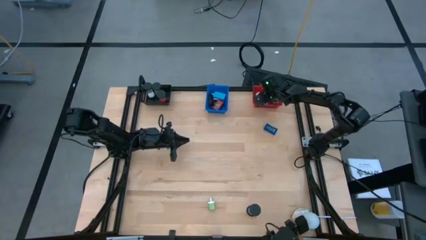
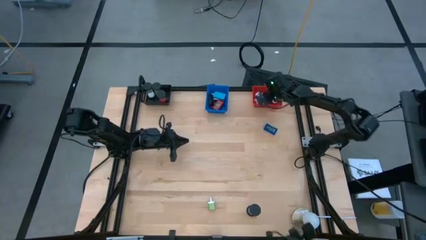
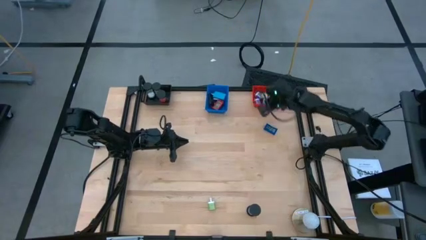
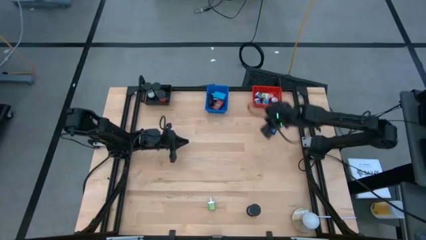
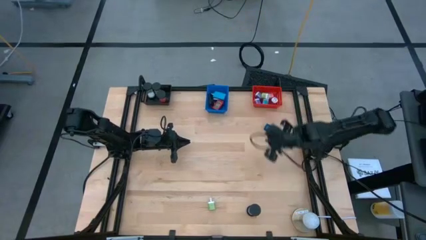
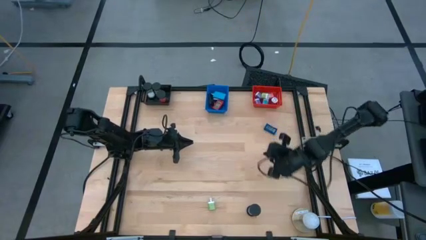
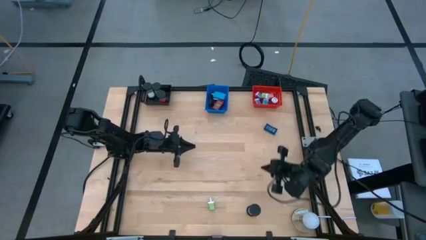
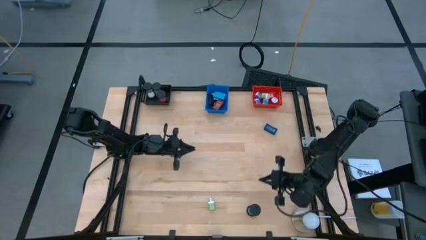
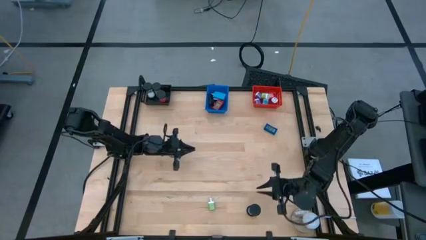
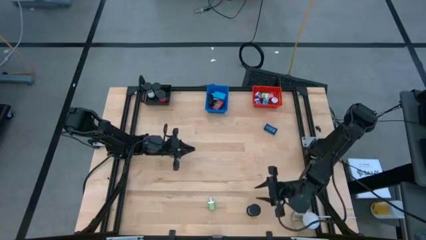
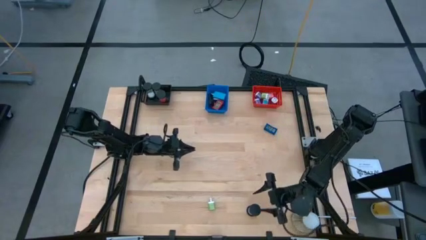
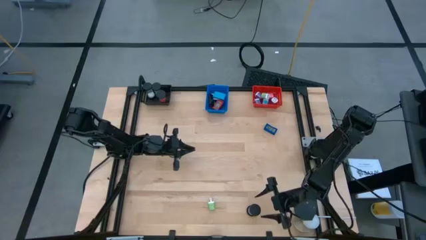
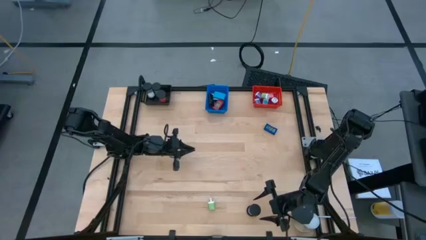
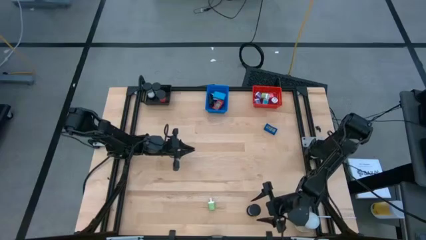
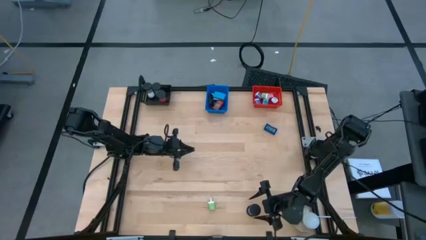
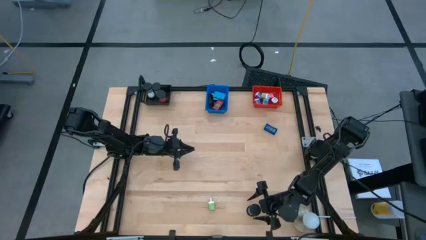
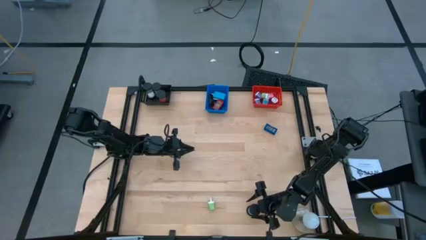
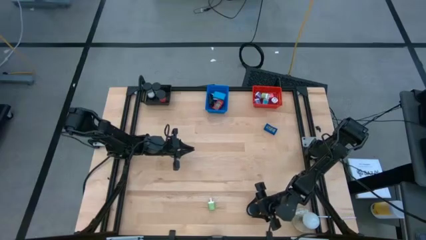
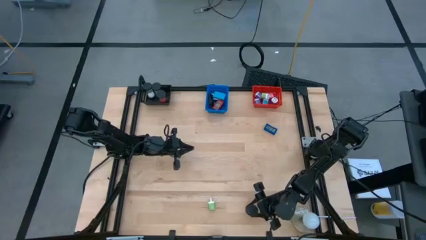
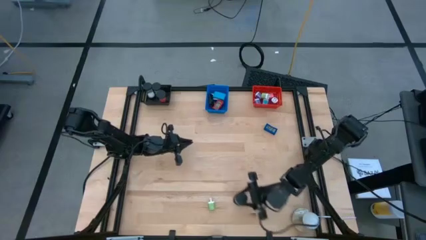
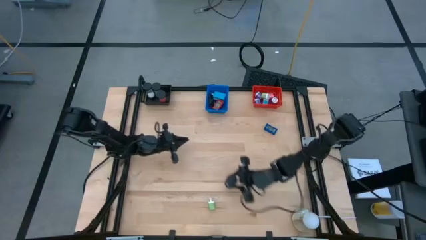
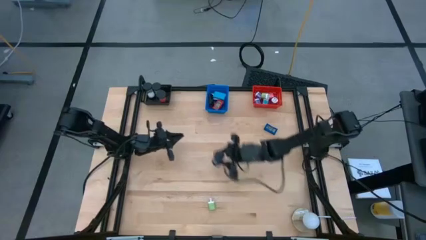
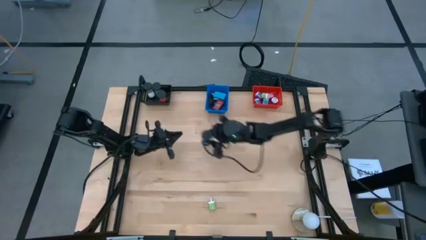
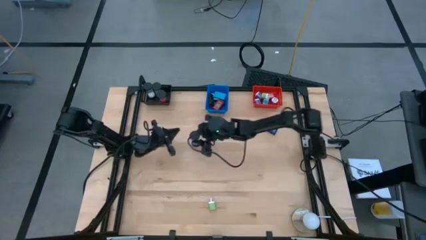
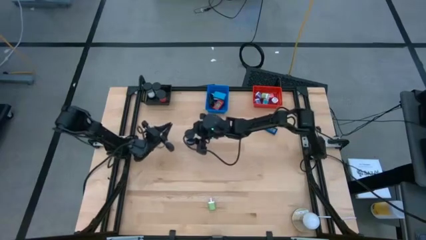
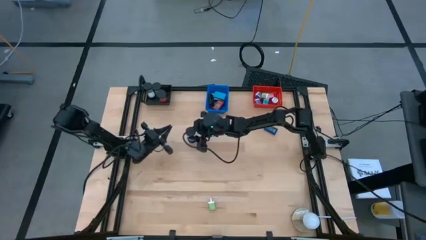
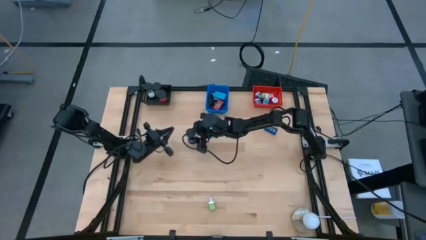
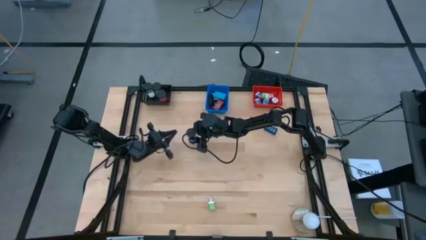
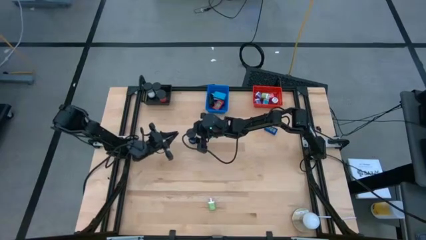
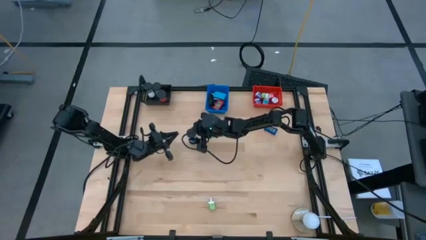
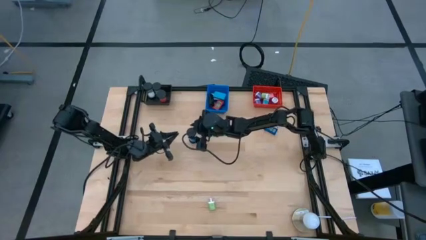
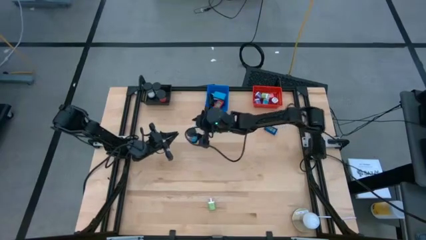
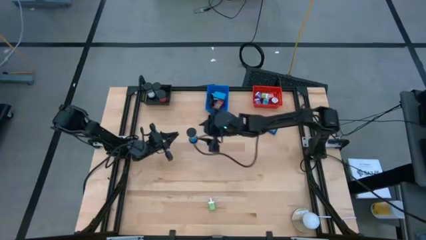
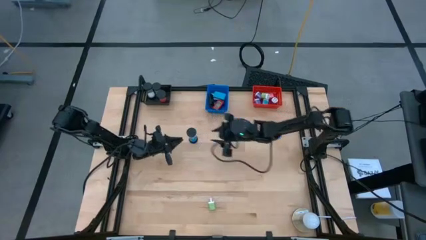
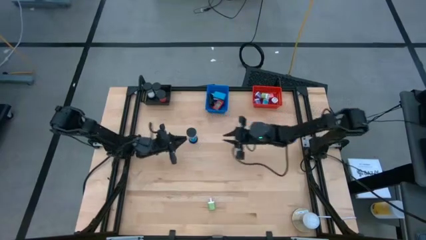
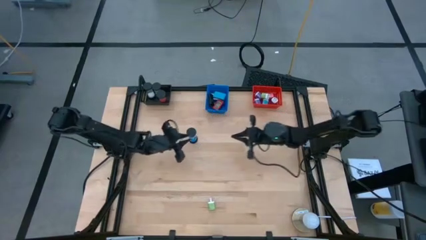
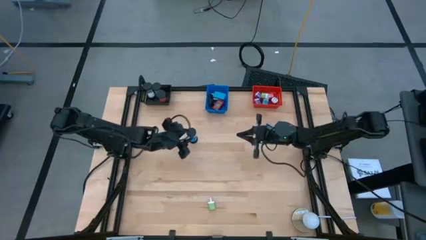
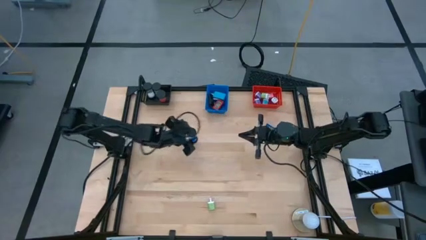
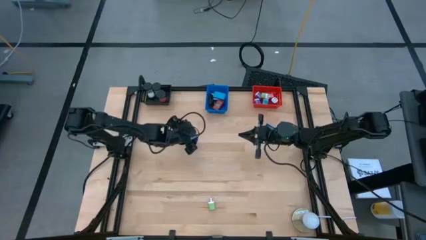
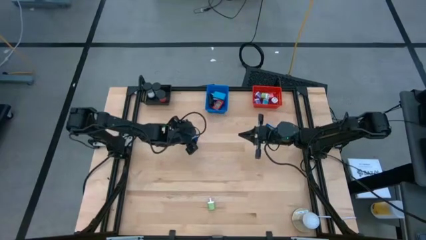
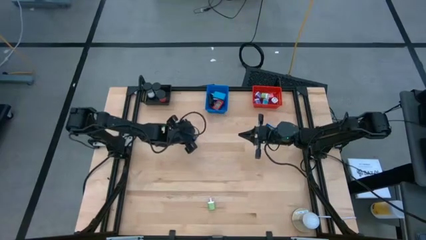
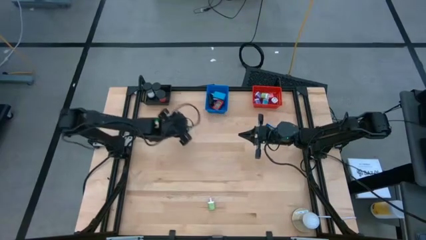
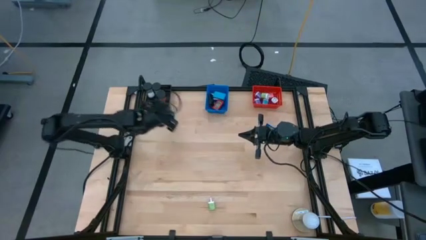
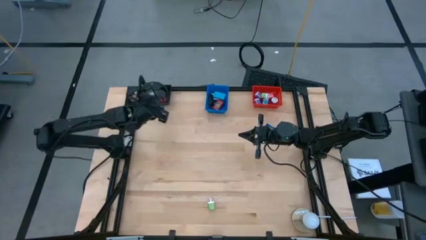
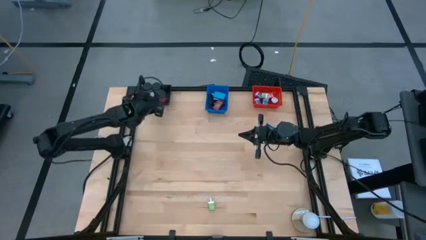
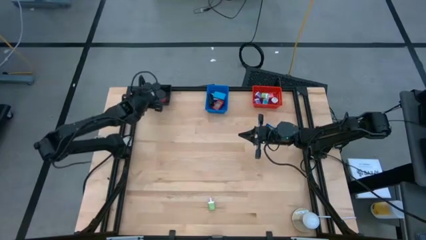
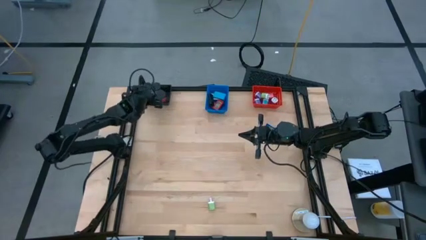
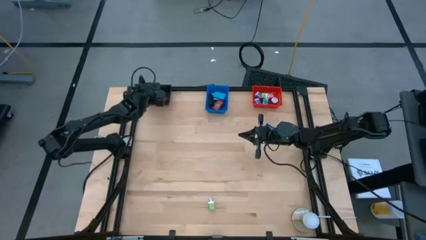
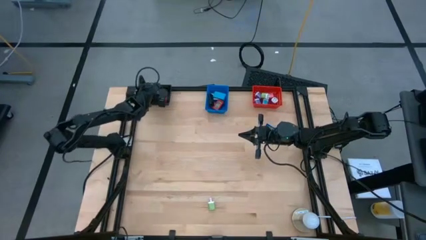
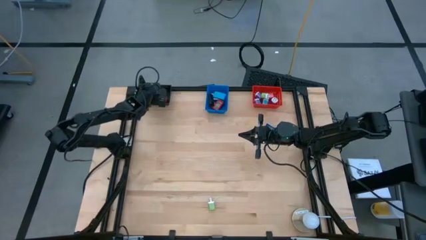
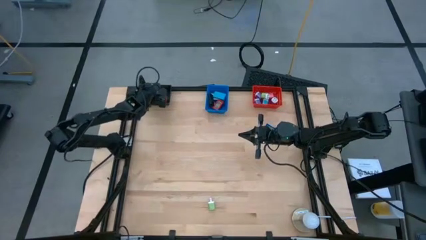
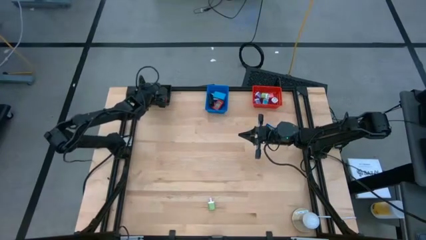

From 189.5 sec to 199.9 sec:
Task: Pick & Place Office items
Put the blue hourglass into the black basket

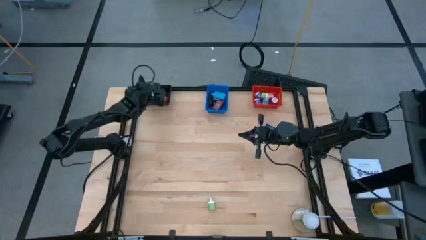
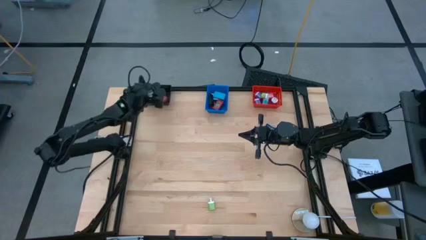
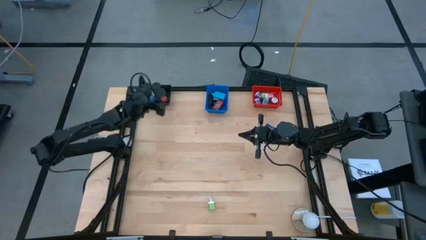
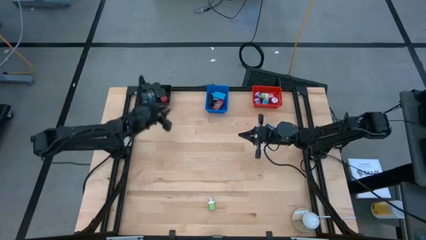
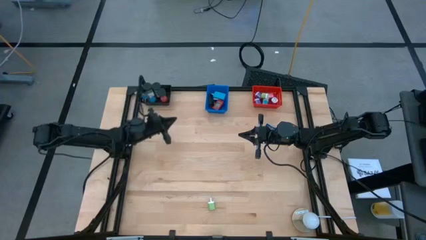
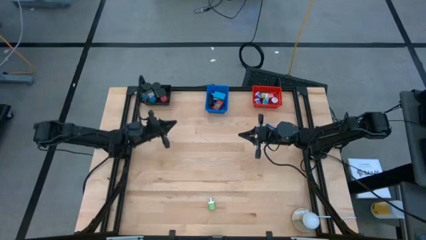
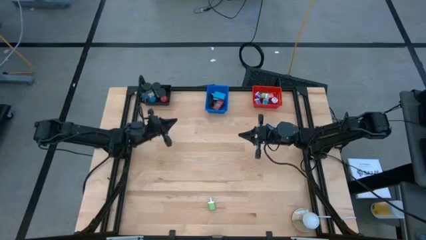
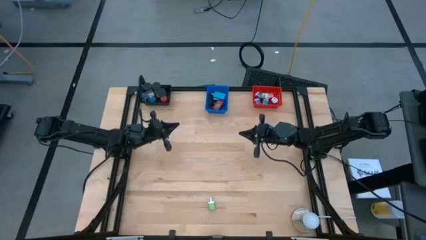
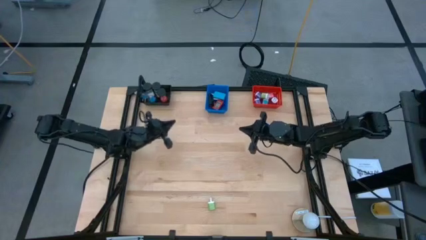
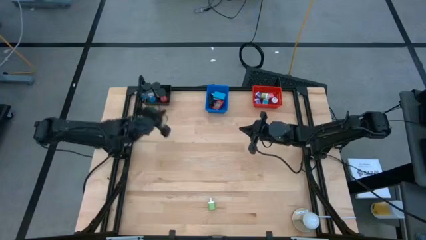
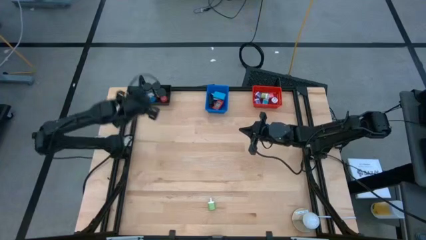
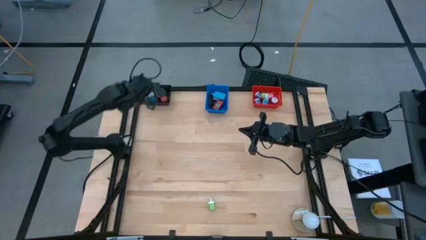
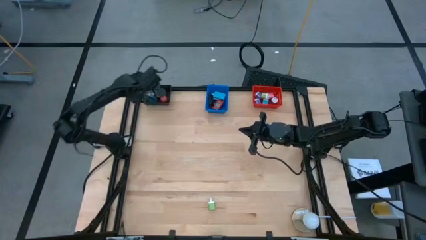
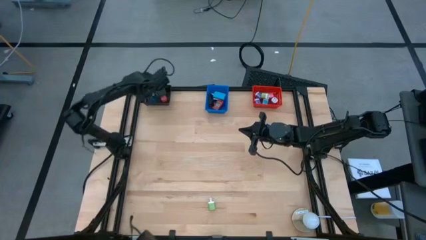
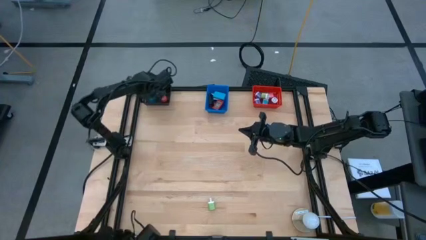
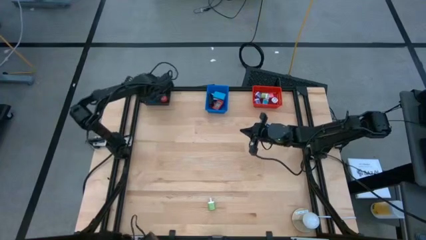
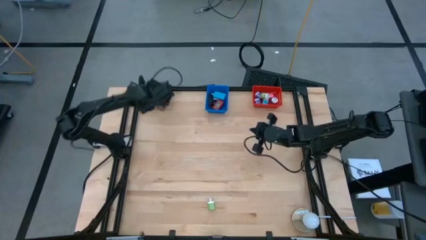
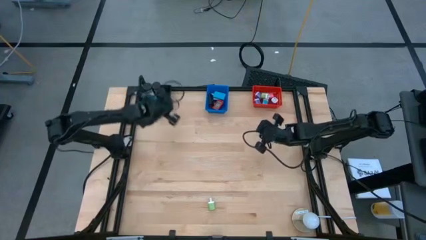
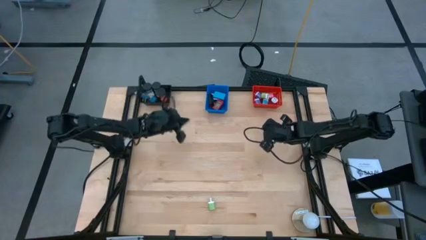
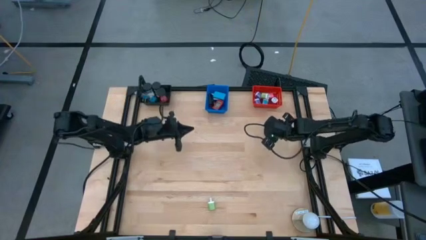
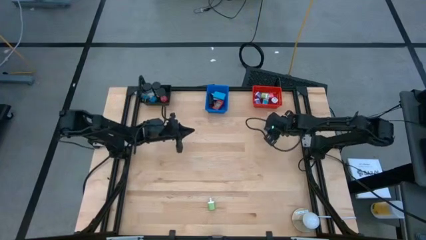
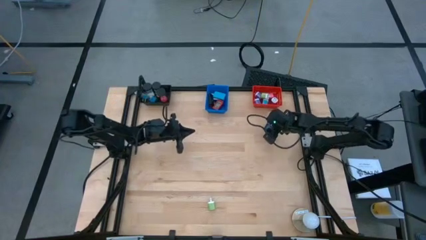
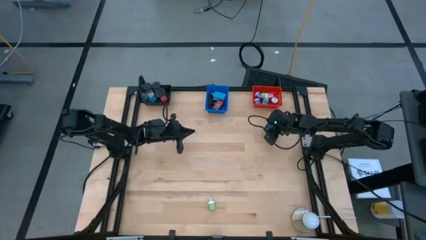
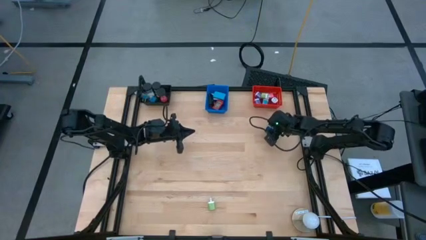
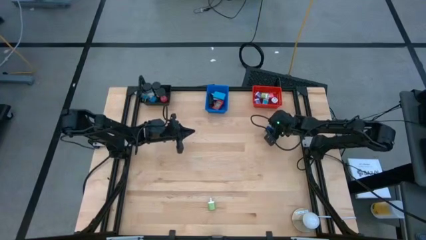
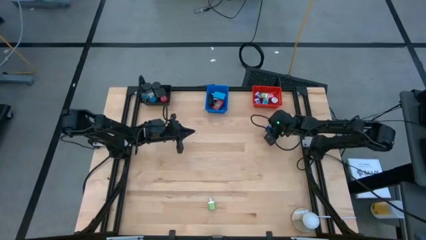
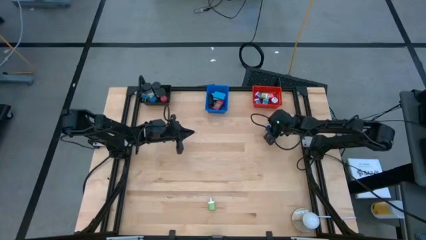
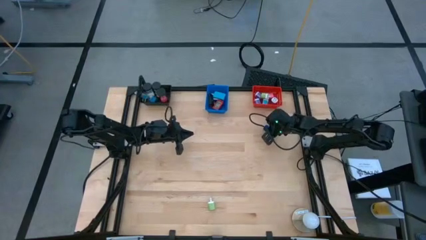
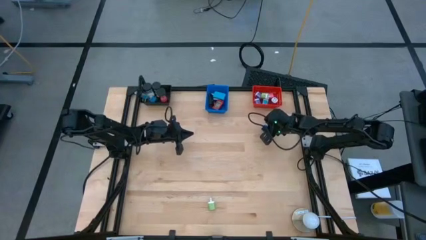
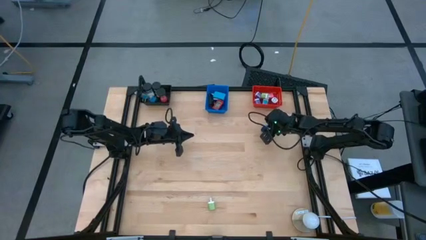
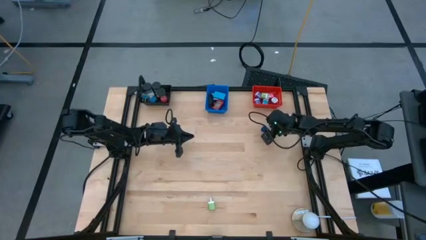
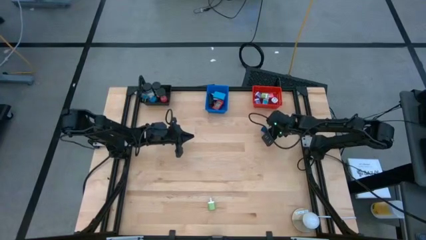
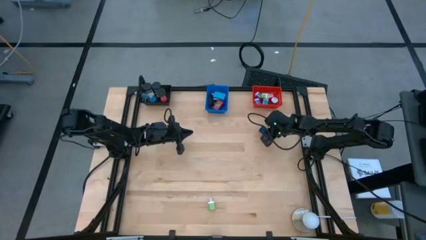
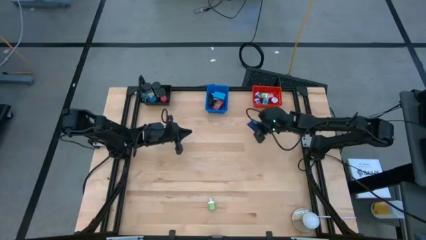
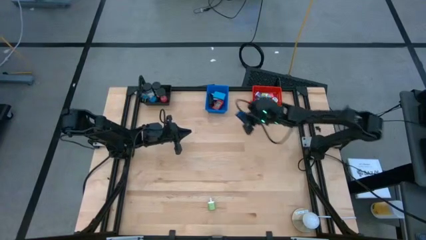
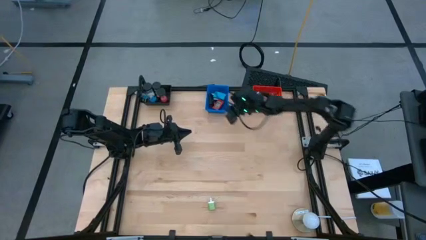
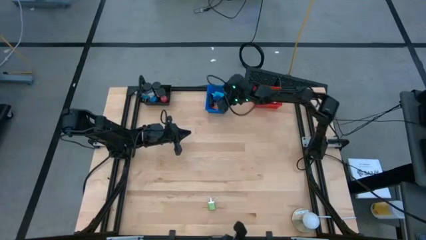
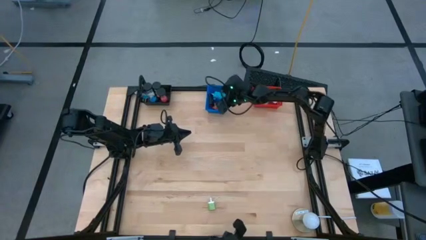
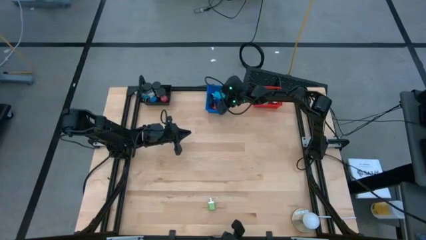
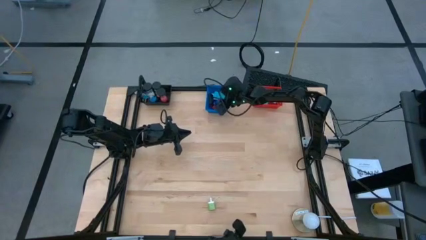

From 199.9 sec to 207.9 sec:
Put the dark blue digital clock into the blue basket
